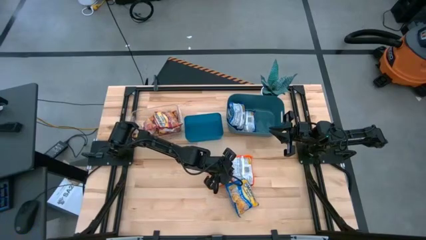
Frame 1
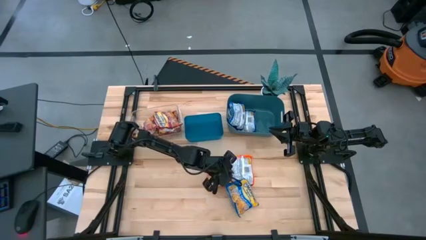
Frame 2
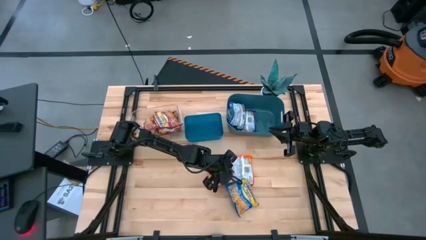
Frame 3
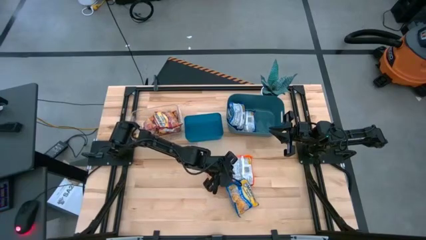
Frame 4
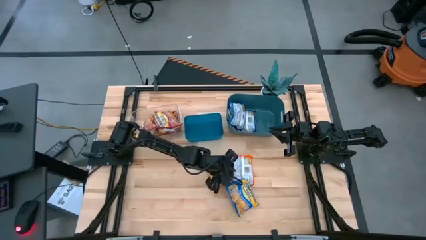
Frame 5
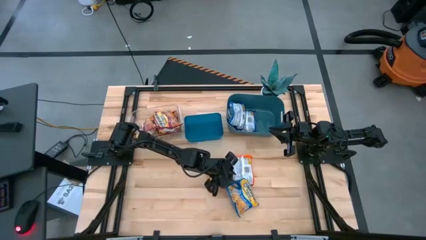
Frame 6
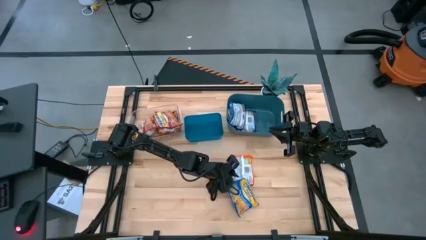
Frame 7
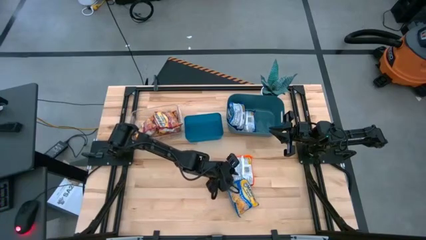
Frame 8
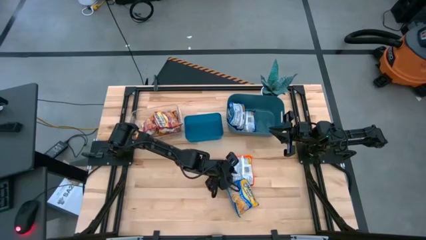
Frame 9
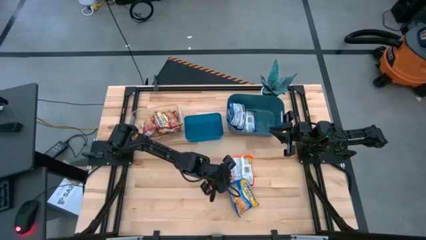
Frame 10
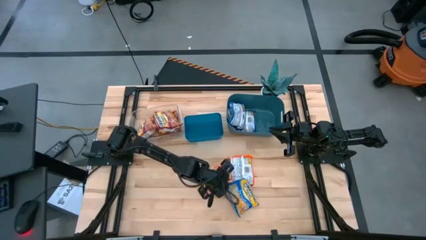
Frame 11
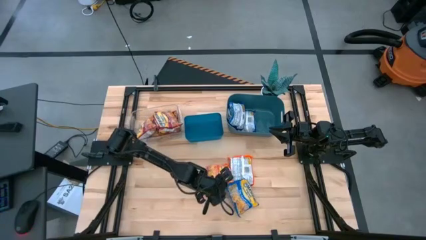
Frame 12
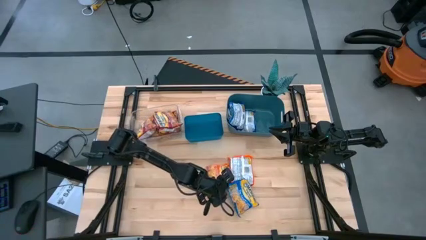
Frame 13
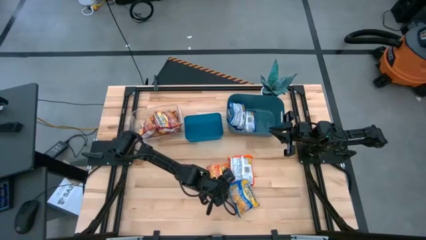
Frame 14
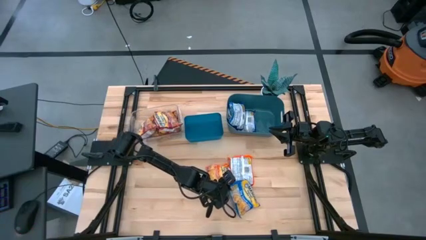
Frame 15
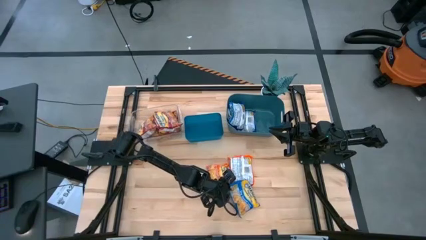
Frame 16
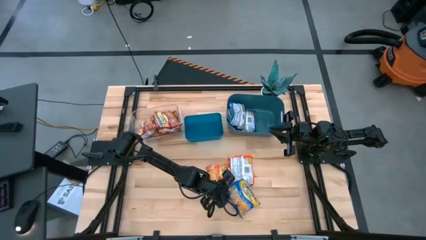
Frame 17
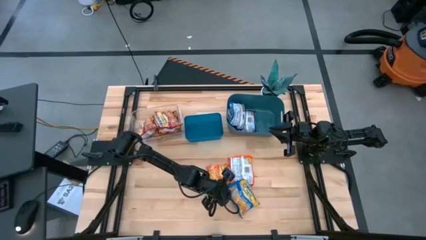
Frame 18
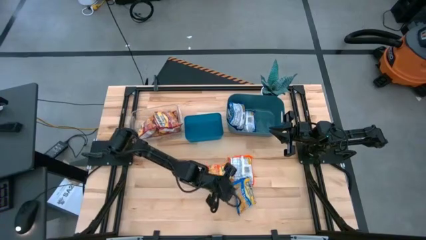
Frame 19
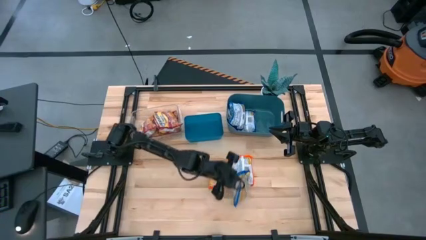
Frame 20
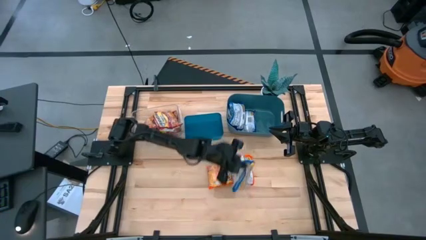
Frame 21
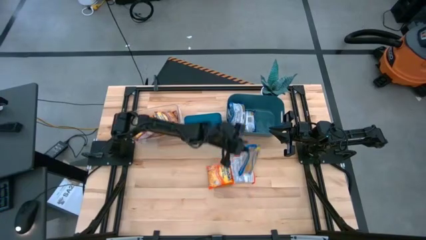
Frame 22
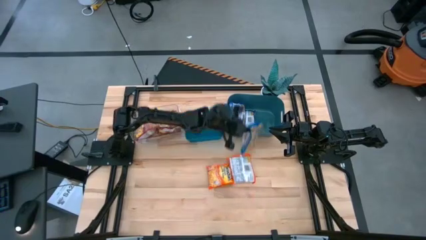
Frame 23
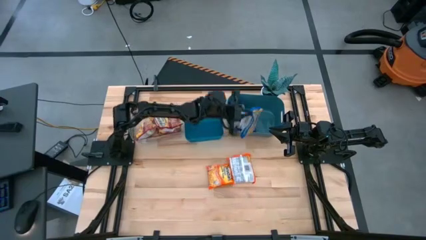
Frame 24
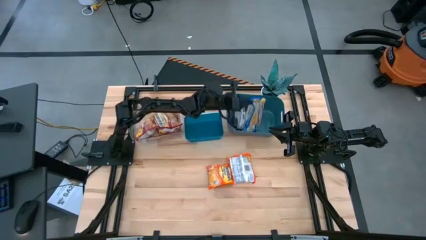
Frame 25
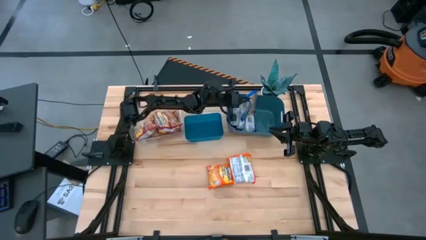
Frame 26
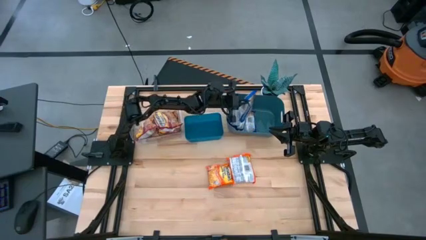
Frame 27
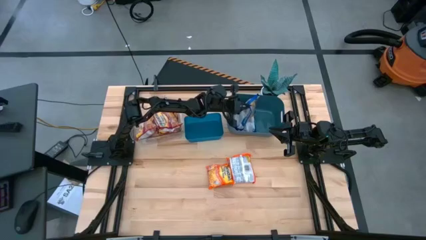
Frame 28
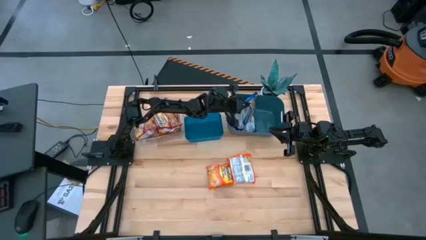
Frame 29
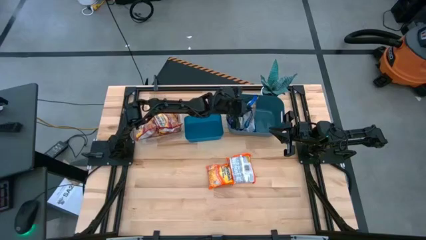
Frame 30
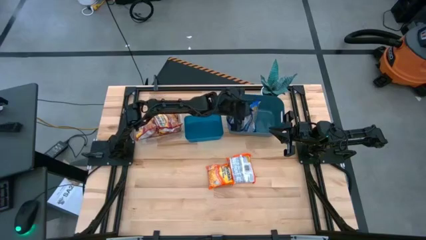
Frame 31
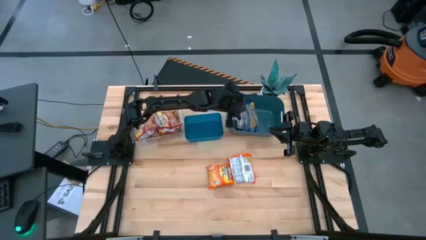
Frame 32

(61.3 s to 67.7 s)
Task: Sort Maruchan noodles
Put the blue noodle pack into the green bin

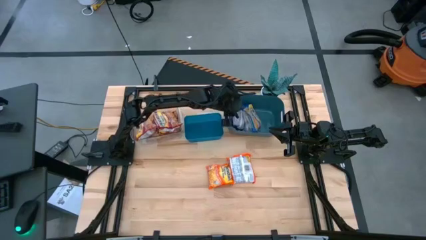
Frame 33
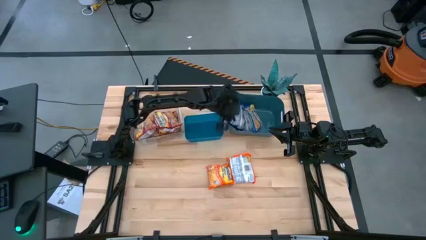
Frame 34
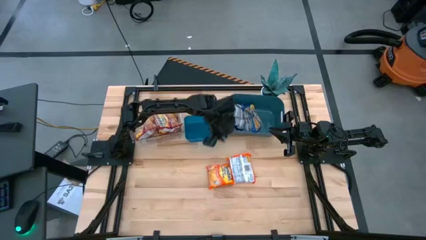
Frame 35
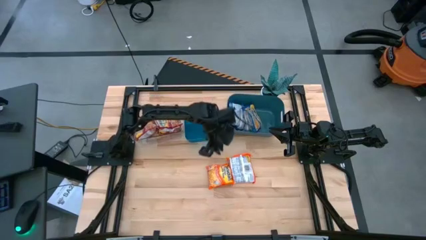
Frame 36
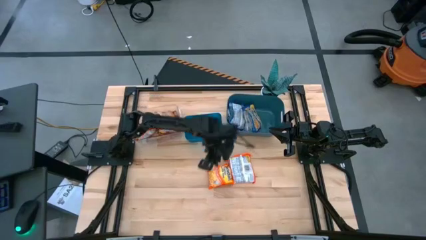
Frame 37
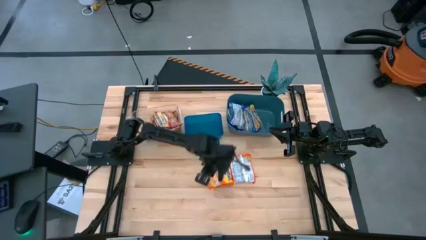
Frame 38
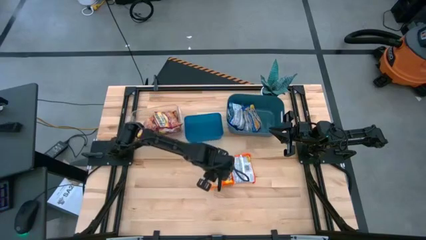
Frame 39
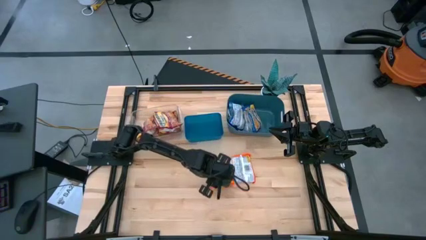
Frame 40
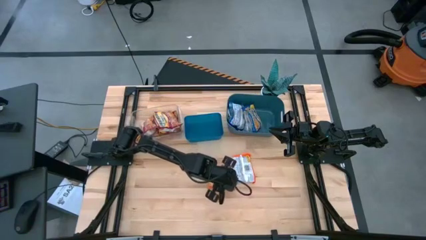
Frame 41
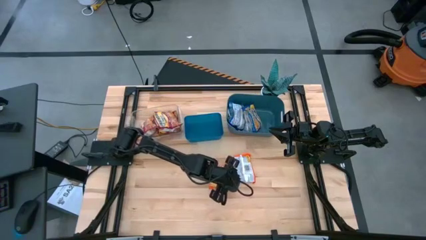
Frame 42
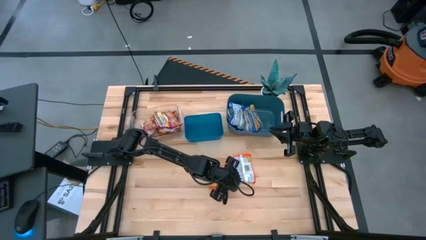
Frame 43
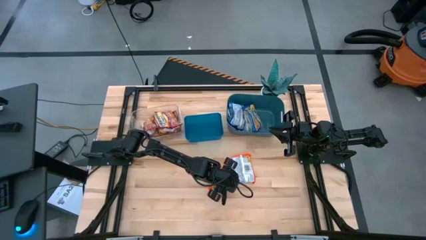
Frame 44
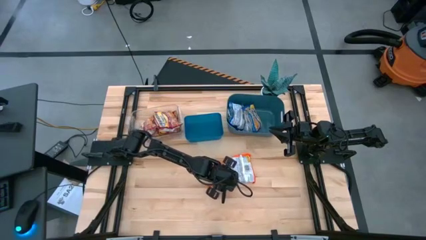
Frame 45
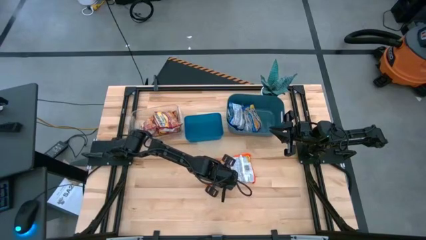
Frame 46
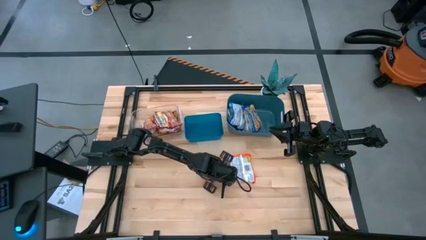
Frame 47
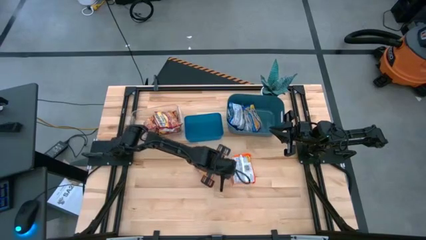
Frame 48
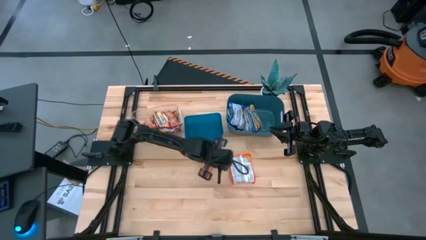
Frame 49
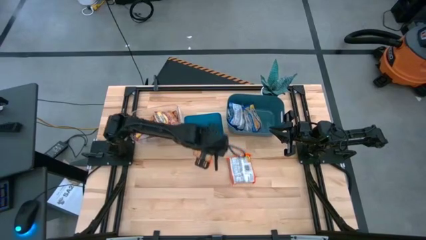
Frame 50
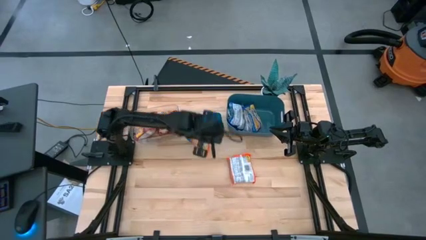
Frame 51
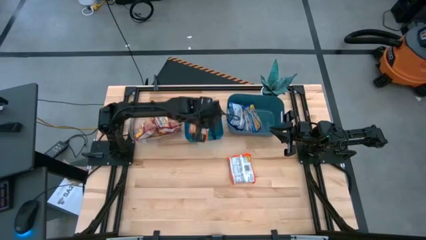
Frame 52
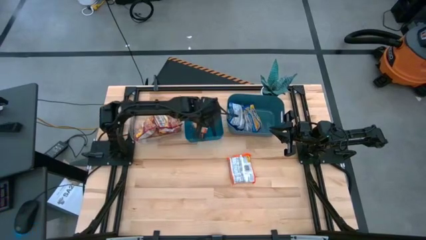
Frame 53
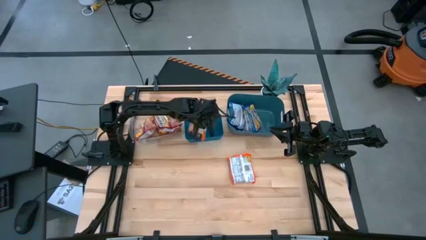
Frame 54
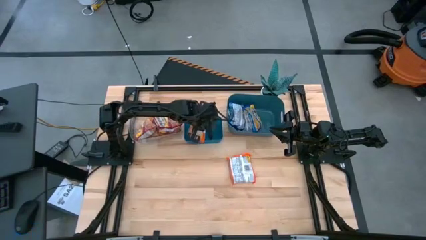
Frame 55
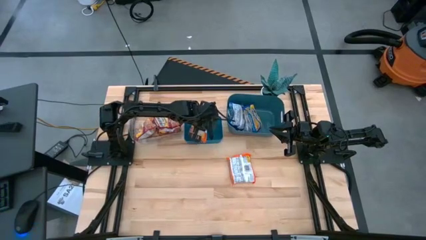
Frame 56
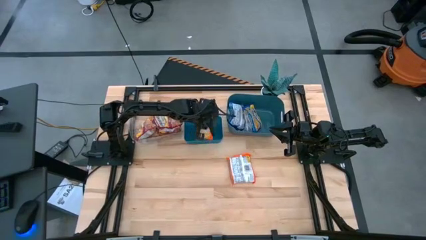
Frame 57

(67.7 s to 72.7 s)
Put the orange noodle pack into the blue bin

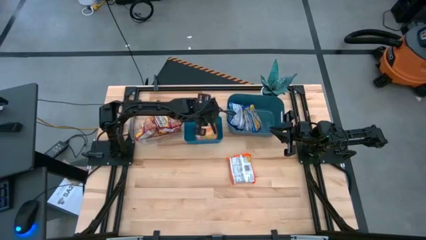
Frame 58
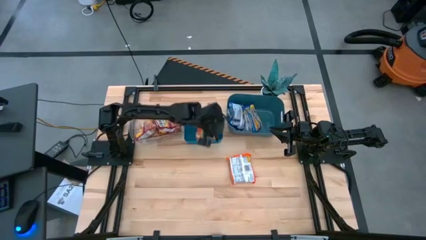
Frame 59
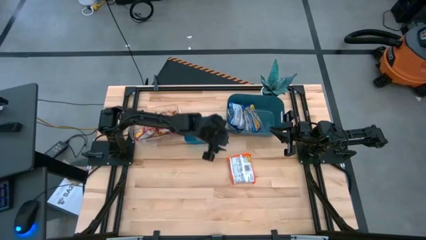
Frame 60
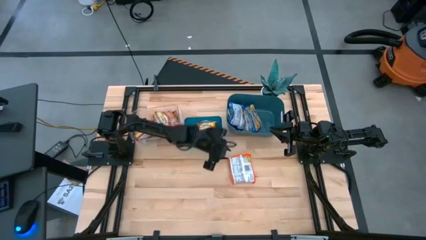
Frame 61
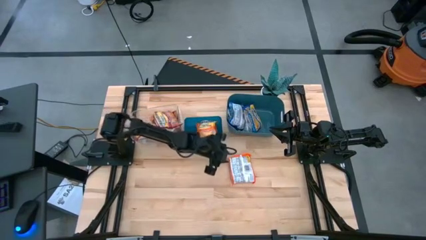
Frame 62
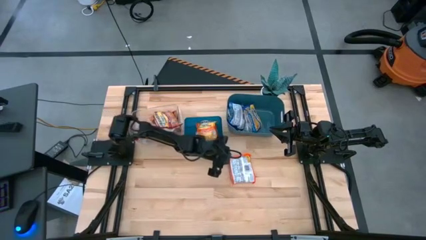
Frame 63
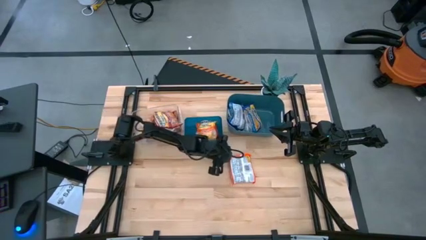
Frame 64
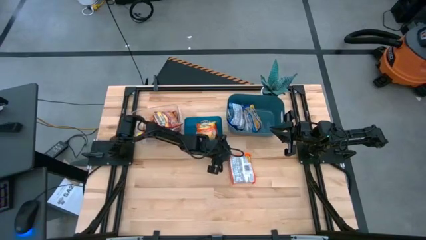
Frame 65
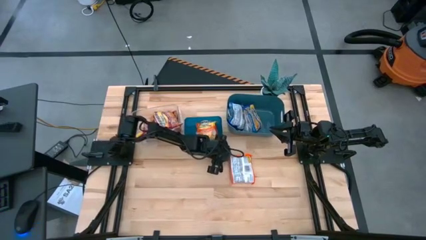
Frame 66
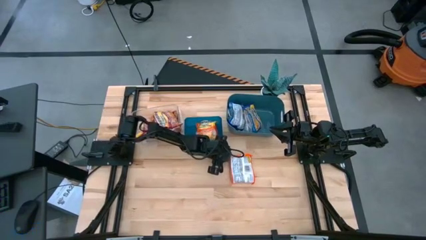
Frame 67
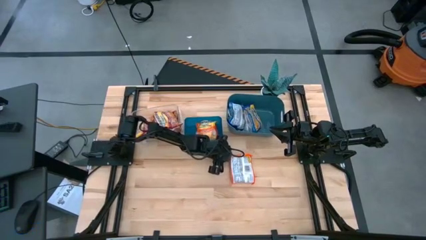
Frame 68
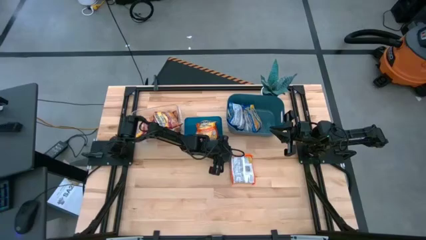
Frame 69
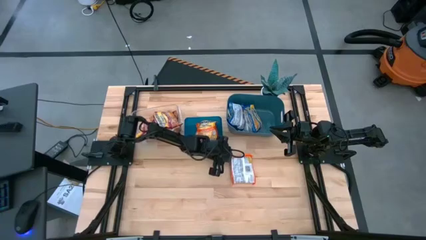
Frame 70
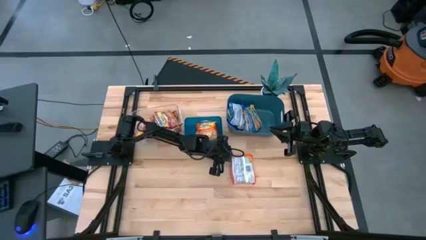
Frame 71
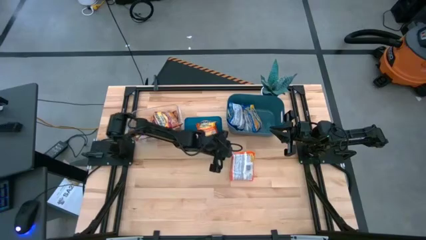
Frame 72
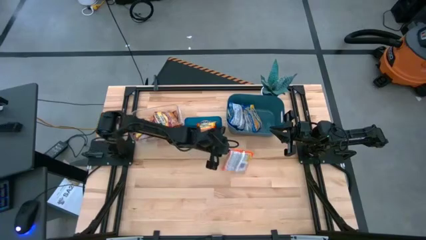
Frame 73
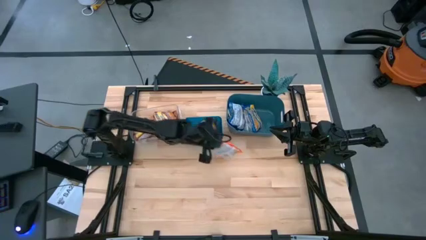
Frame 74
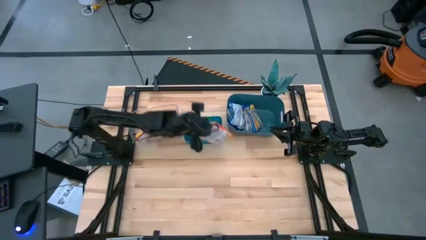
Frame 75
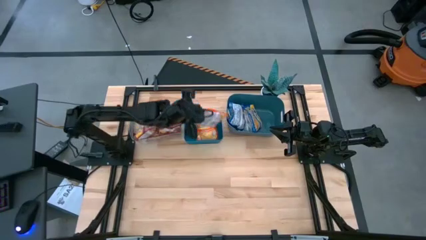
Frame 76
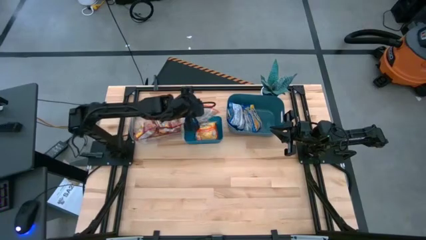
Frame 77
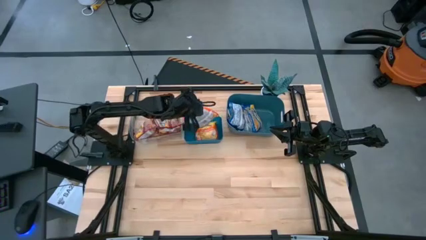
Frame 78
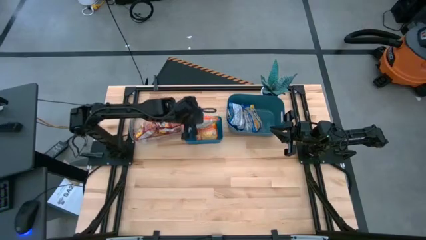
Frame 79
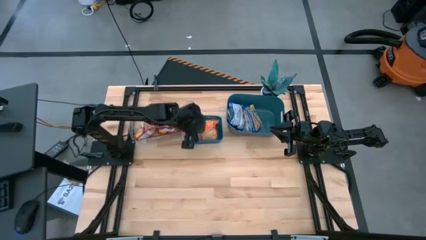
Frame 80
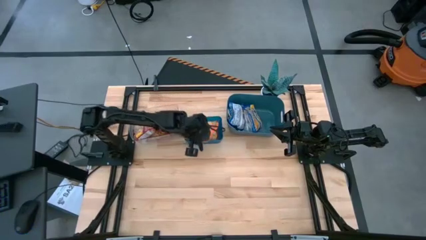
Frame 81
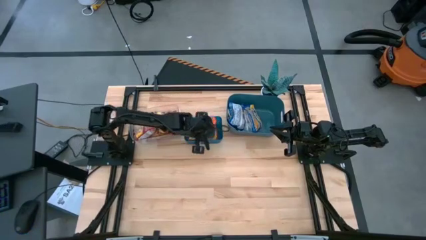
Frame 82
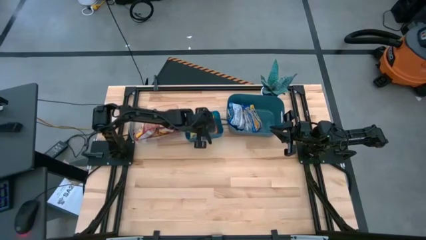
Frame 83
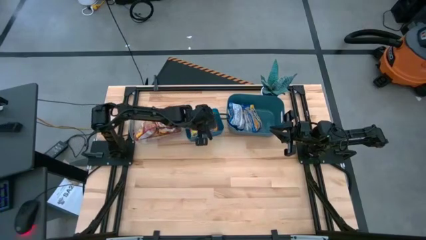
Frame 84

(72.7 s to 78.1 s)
Put the orange noodle pack into the blue bin
